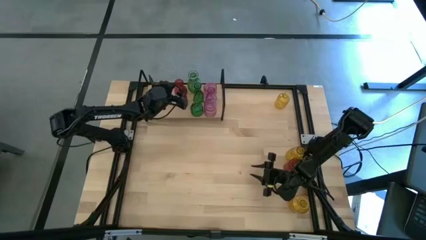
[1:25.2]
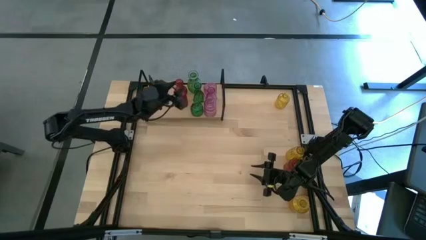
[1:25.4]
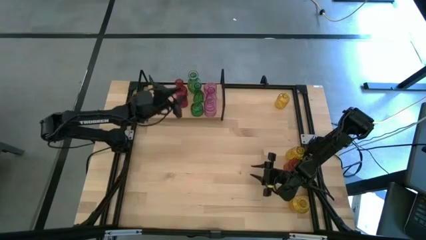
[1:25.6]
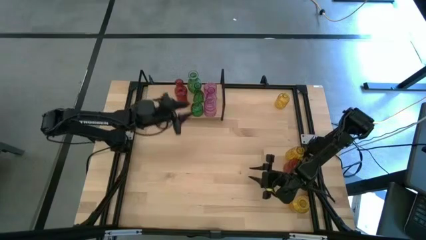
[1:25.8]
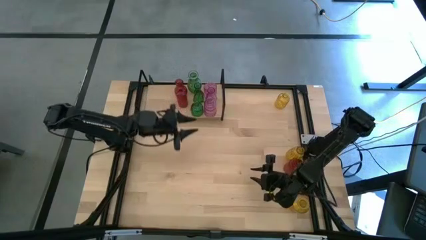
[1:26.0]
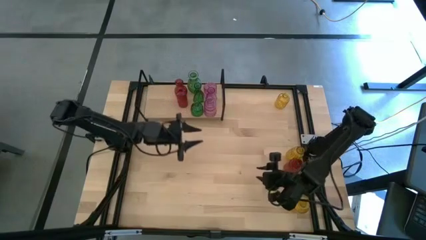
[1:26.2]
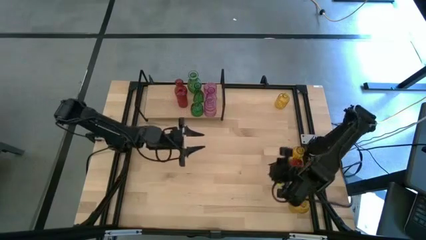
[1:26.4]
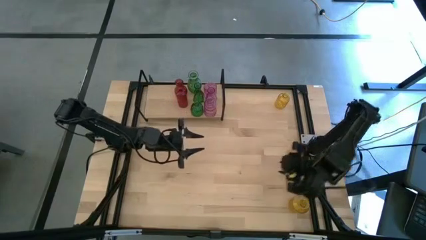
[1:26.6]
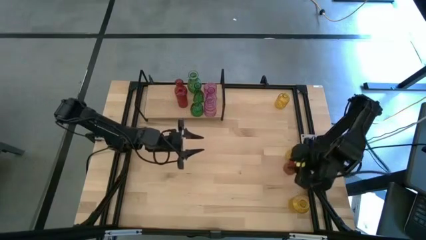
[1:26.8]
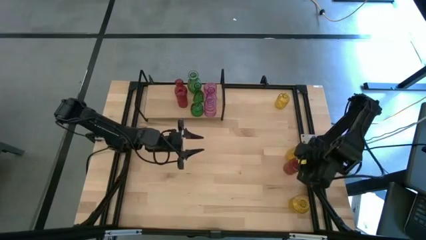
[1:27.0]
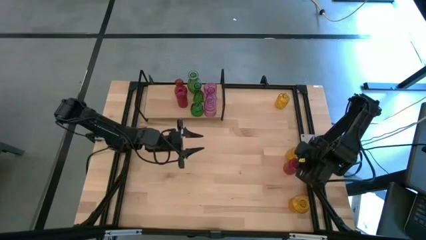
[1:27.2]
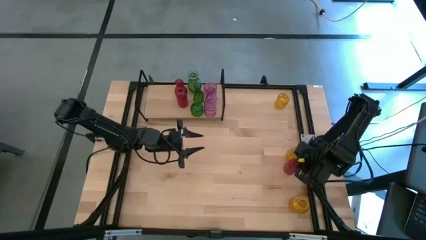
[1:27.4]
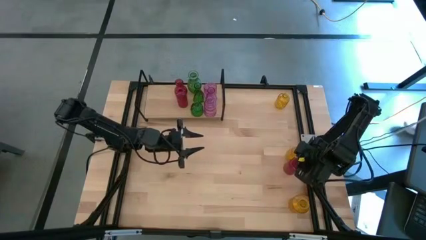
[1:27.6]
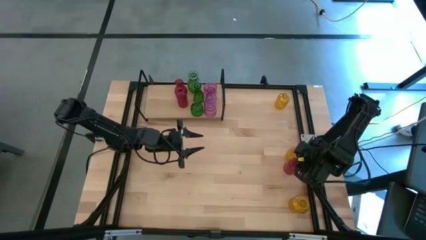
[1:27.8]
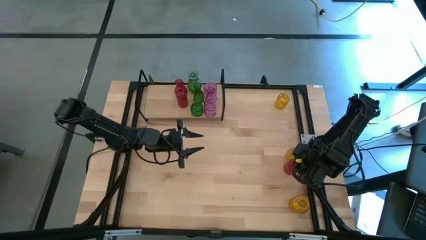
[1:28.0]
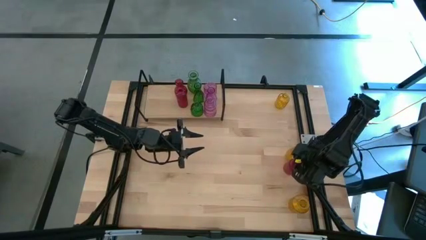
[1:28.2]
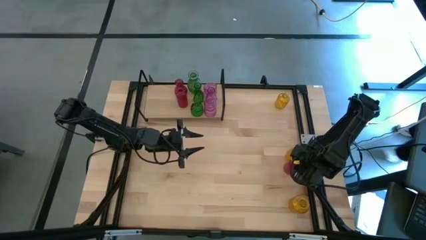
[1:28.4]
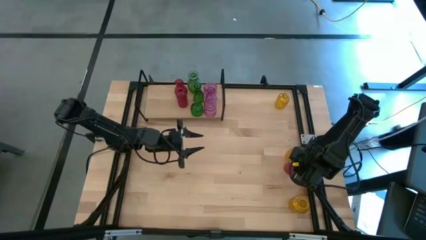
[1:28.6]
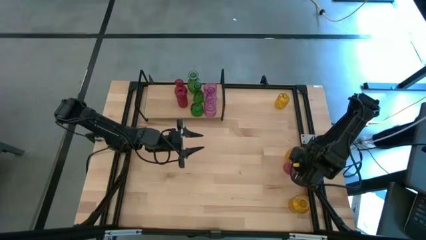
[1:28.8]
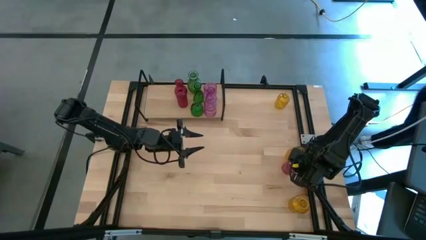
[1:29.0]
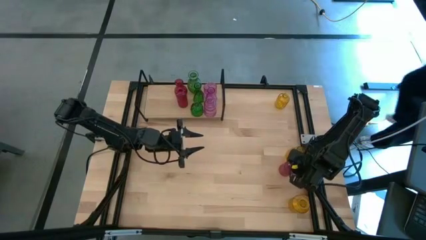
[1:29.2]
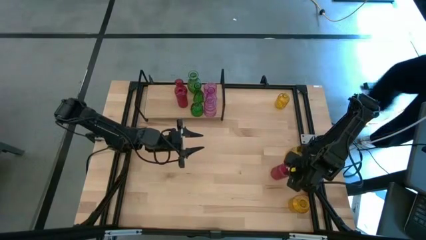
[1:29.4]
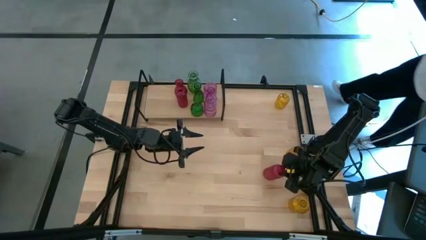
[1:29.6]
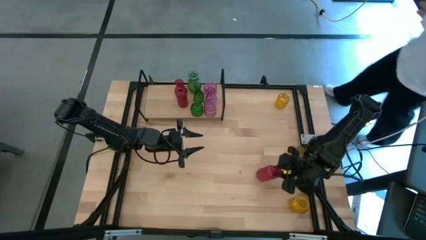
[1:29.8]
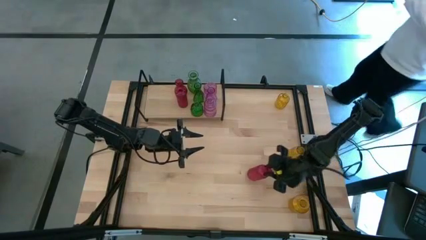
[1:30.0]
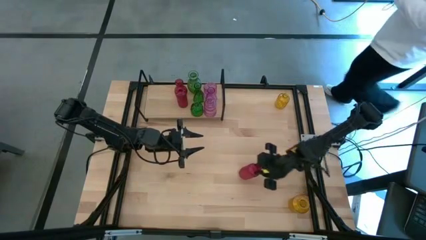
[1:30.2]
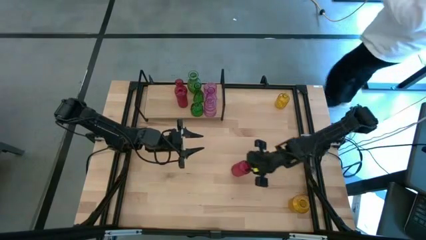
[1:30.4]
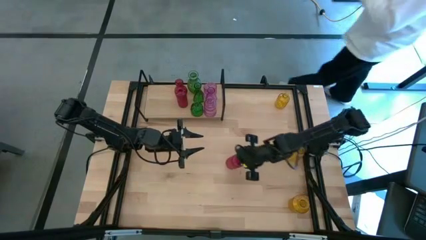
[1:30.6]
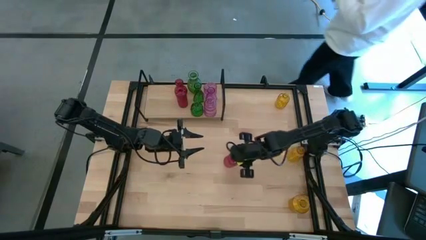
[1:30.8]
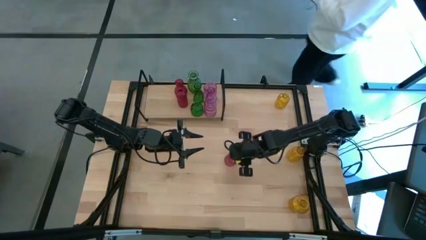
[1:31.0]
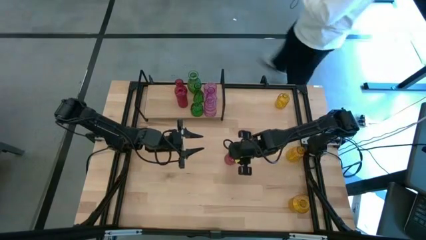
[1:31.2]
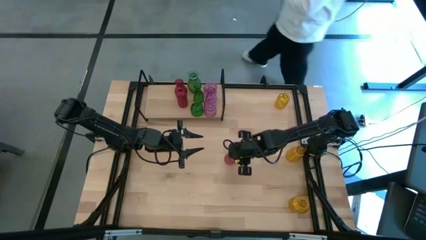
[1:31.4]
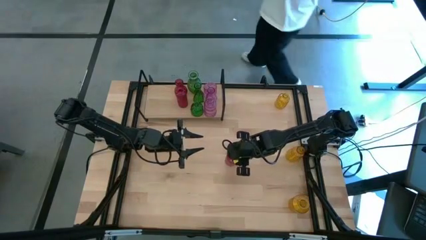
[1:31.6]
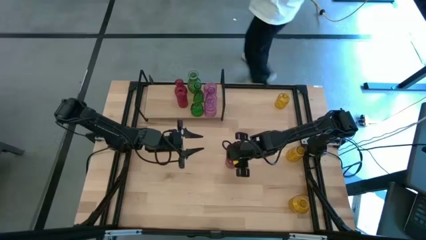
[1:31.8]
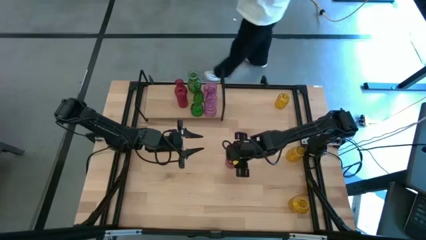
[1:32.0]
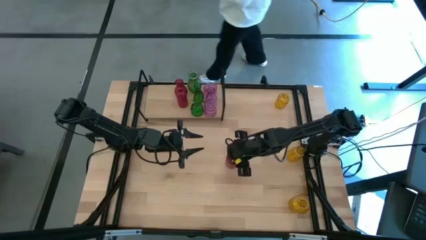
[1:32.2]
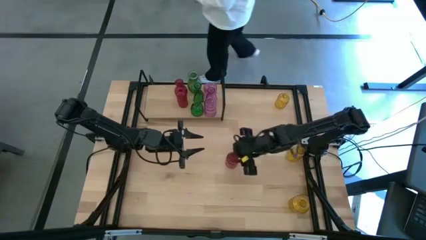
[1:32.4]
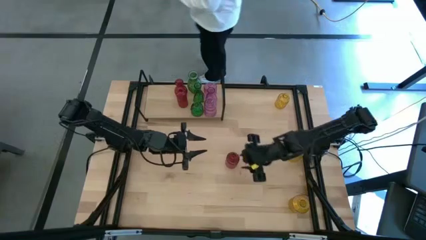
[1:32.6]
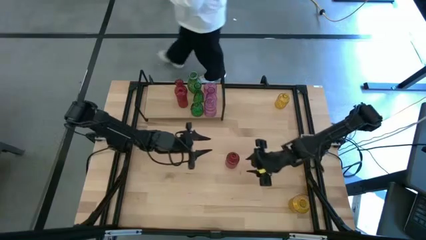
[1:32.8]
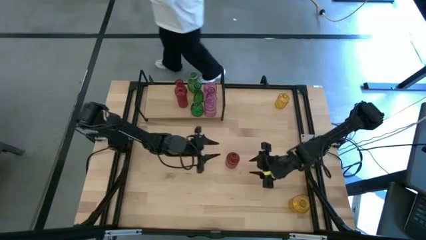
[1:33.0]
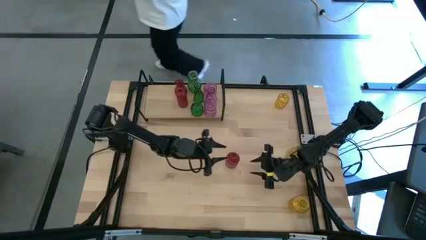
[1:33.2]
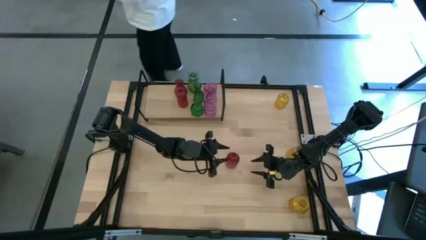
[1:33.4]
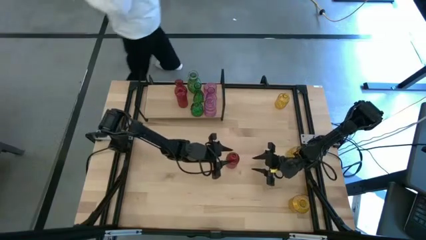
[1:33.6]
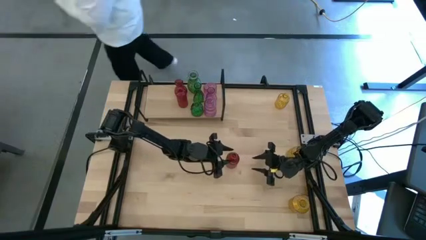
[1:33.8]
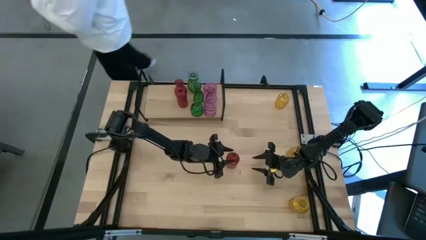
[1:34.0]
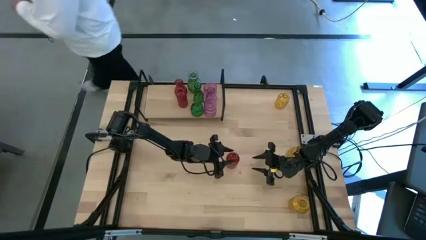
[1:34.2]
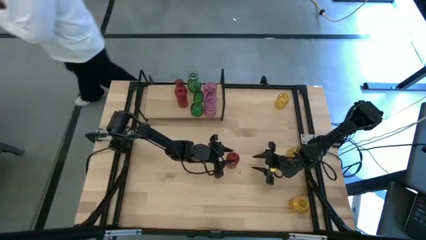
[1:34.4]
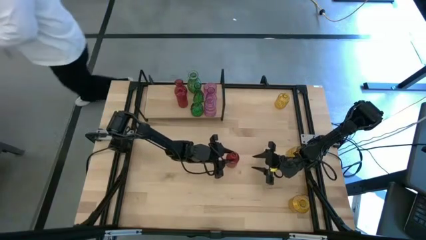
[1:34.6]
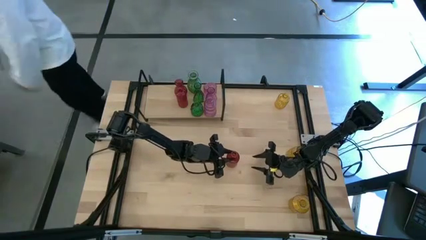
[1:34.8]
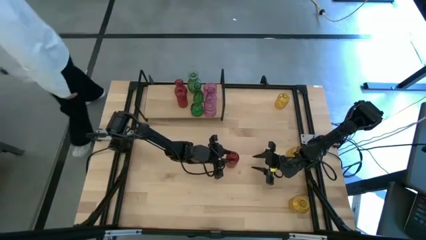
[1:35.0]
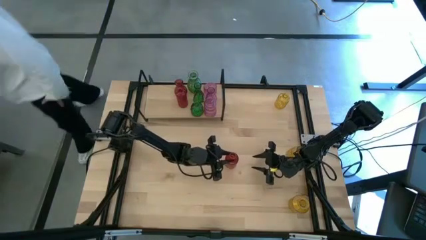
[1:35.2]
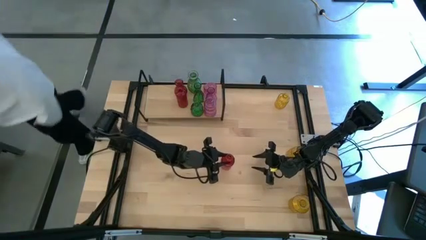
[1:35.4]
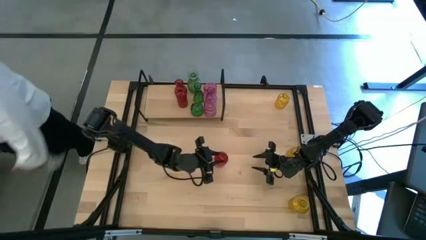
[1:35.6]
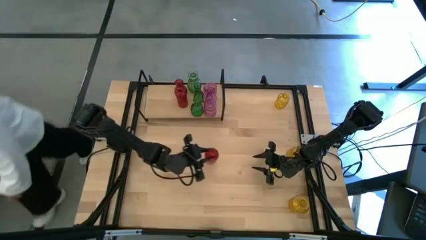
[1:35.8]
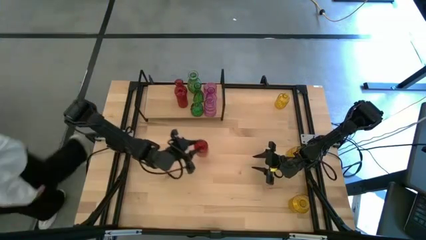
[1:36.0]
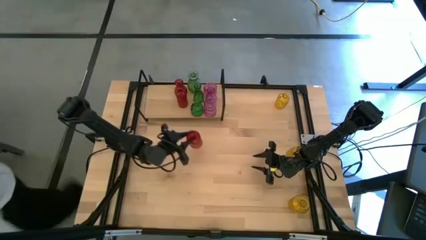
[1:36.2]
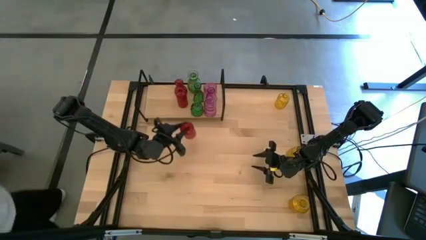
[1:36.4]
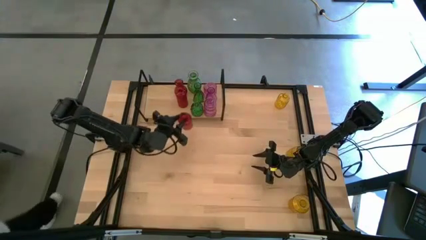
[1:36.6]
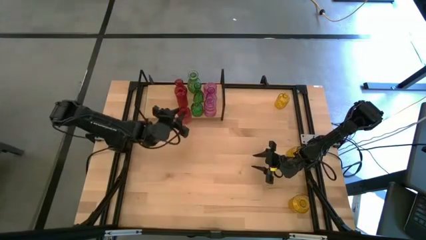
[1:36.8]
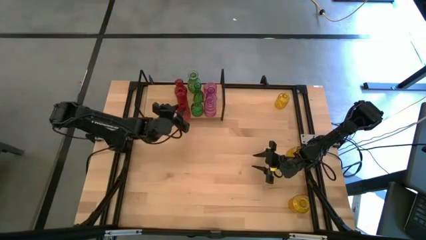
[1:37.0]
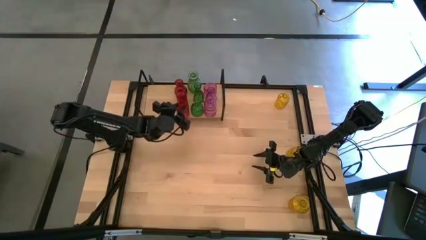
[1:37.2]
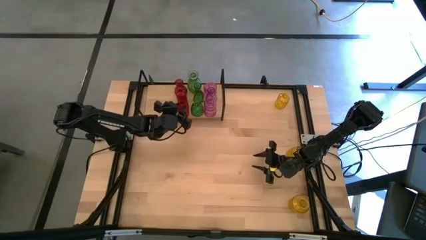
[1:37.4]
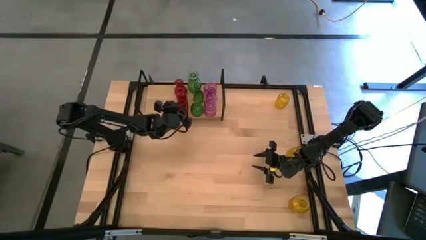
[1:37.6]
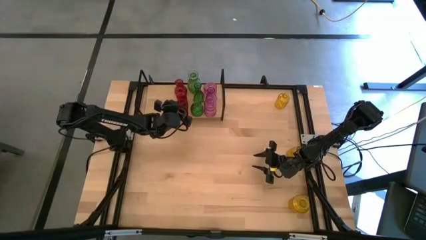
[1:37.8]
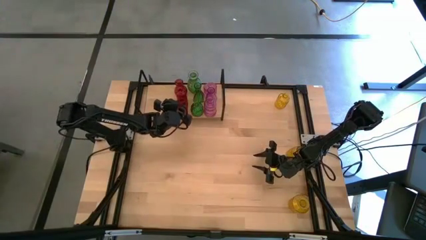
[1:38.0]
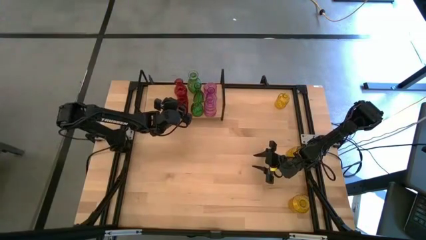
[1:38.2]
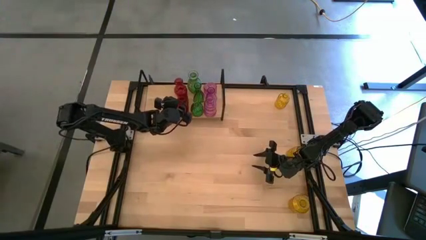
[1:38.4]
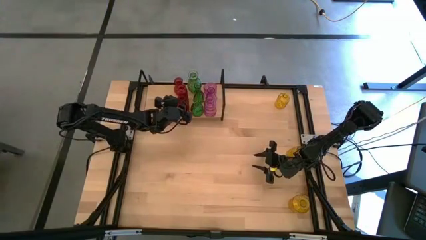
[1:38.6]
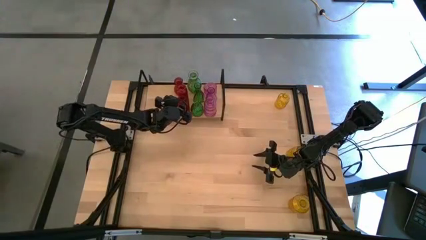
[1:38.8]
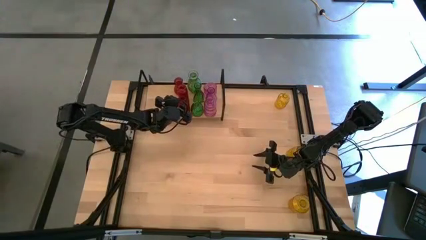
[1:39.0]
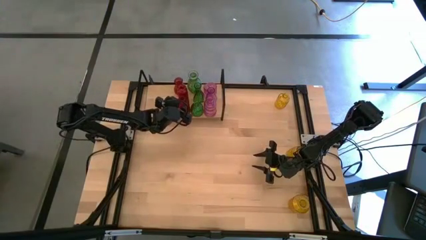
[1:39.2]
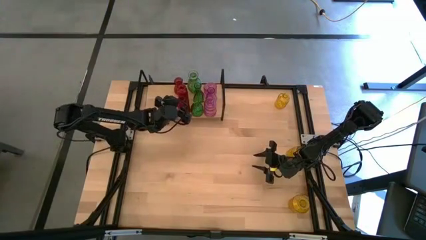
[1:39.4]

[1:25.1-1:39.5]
Task: sort vases onto shelf
Put the red vase on the shelf aligned with the other red vase

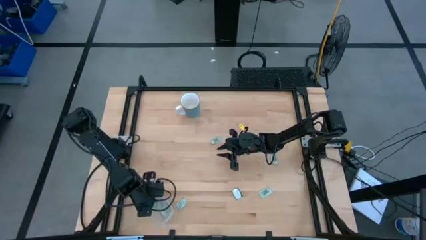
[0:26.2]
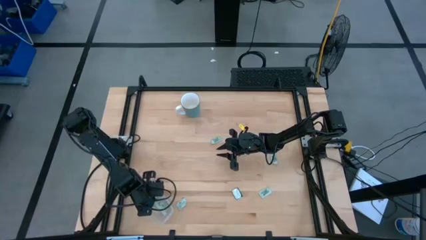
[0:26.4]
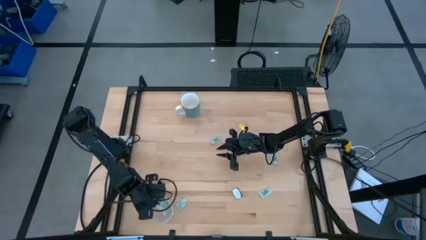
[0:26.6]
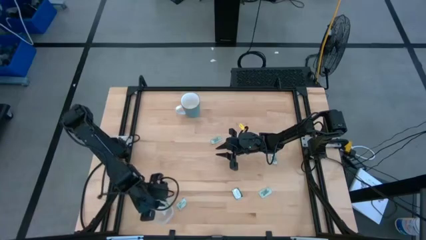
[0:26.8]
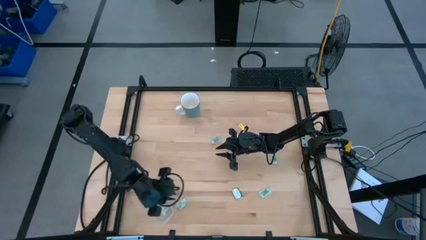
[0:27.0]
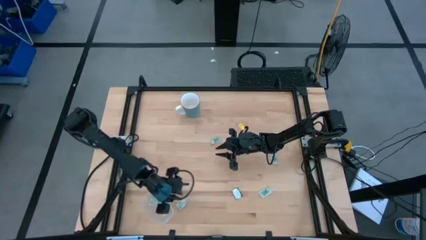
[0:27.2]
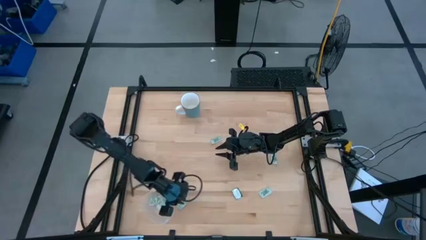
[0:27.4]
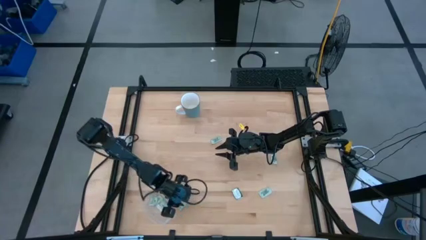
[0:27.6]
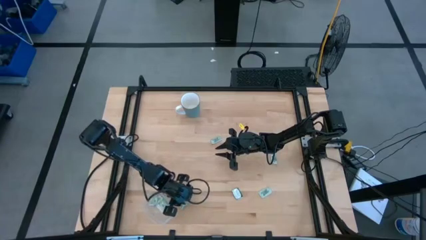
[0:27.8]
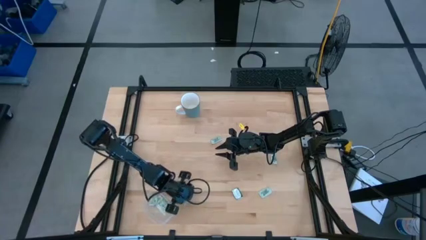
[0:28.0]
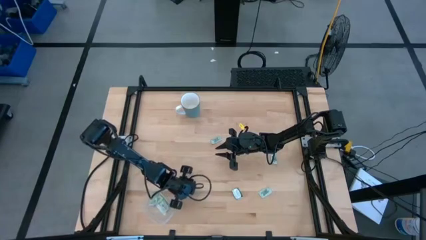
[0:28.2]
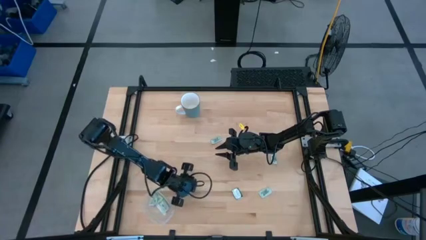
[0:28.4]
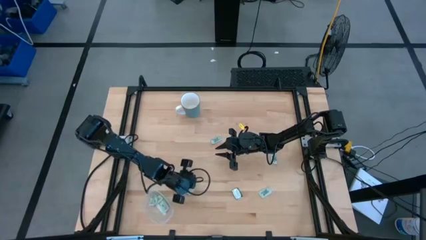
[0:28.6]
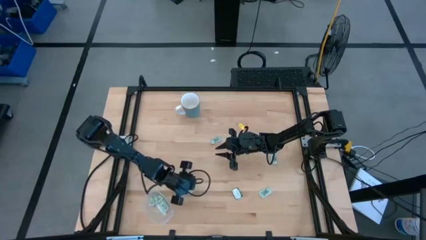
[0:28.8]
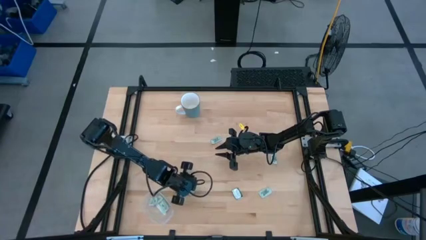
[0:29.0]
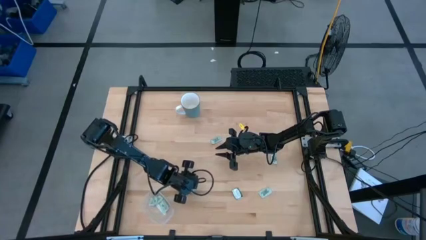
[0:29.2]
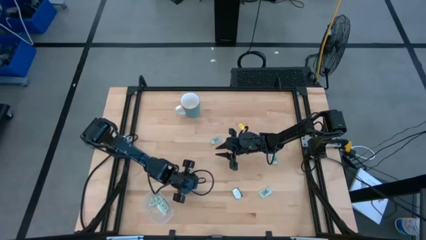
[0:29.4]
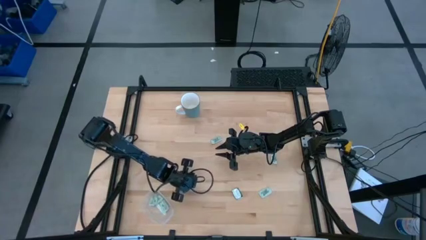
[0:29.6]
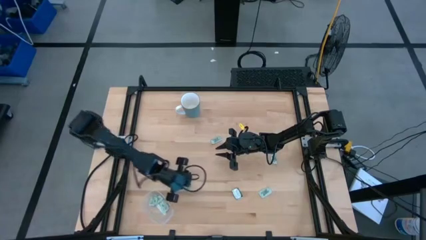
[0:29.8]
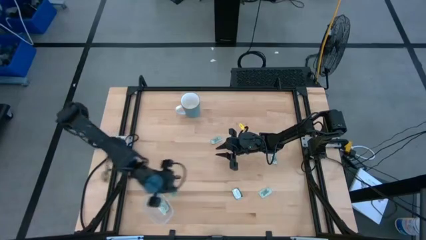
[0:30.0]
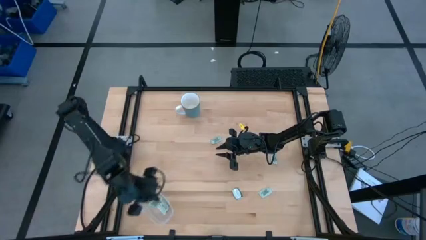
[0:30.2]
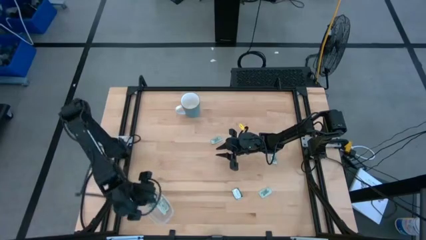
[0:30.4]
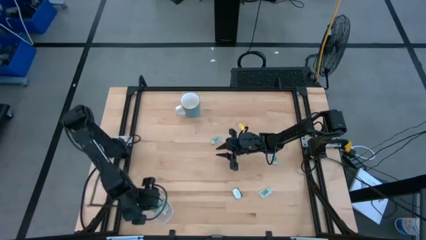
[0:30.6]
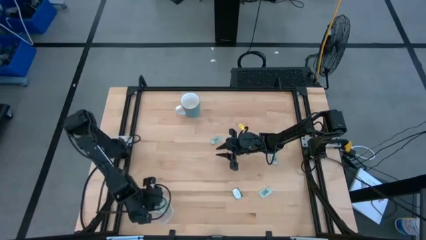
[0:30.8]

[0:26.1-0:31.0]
Task: Pick and place Stevia / Truvia into bins
Put the stevia packet into the transparent container
